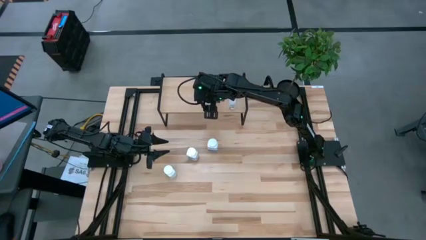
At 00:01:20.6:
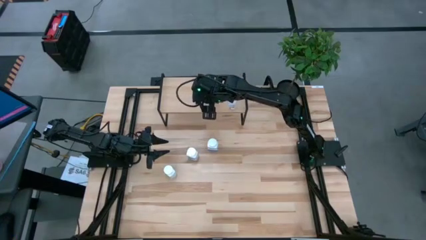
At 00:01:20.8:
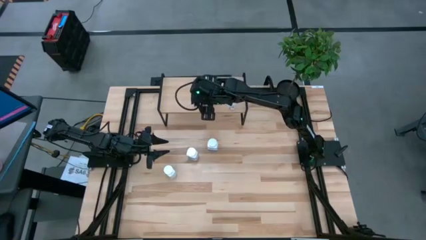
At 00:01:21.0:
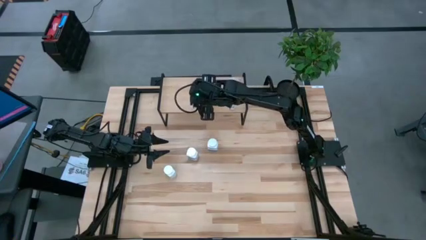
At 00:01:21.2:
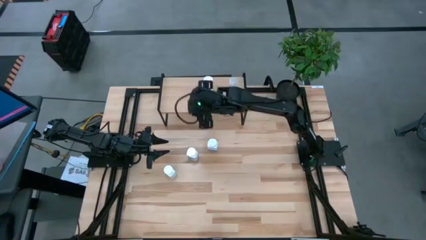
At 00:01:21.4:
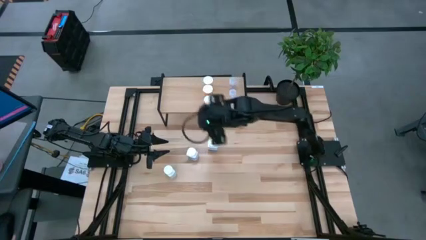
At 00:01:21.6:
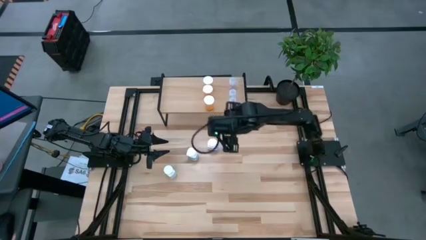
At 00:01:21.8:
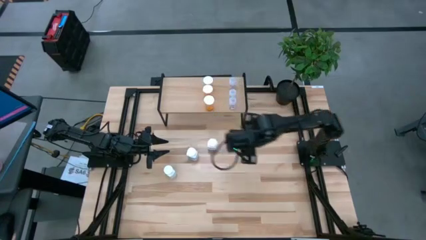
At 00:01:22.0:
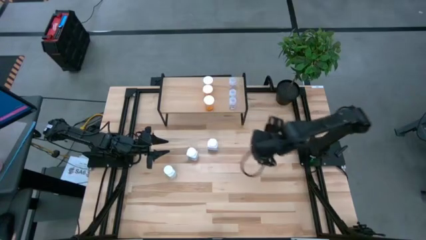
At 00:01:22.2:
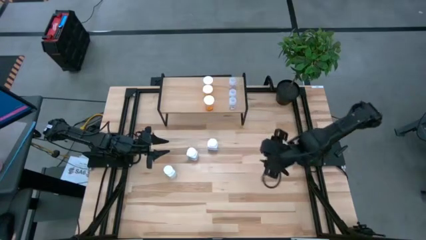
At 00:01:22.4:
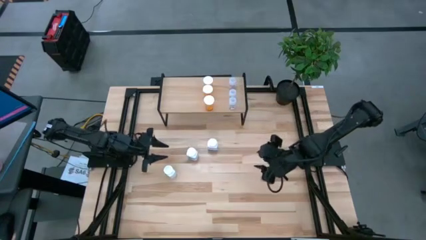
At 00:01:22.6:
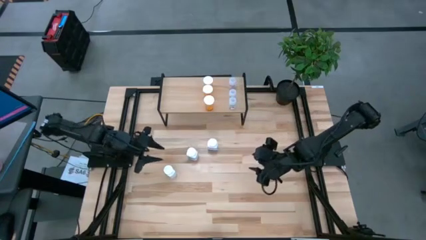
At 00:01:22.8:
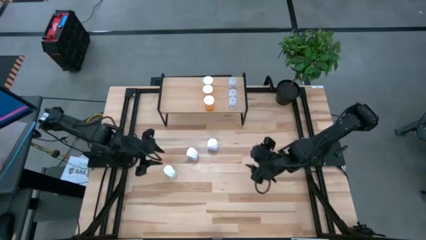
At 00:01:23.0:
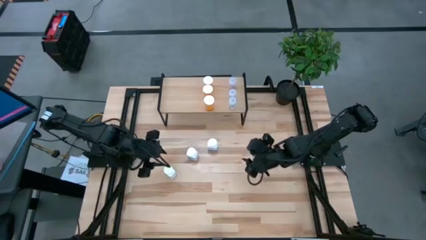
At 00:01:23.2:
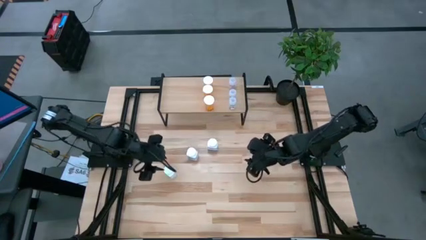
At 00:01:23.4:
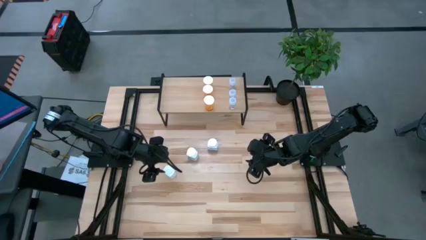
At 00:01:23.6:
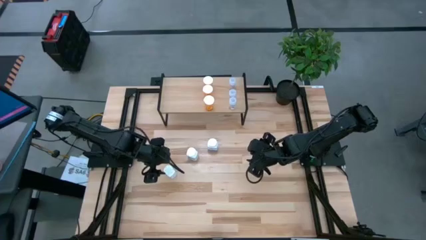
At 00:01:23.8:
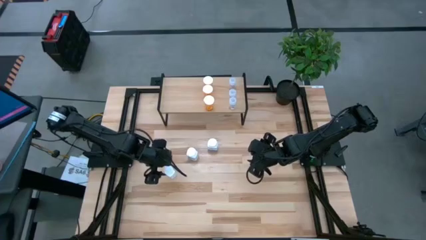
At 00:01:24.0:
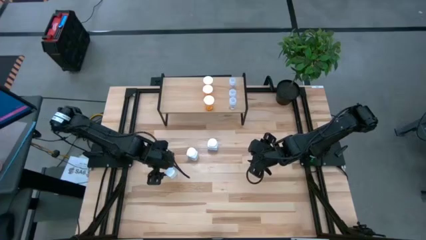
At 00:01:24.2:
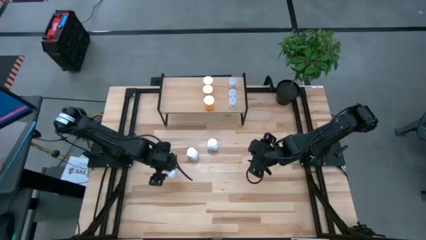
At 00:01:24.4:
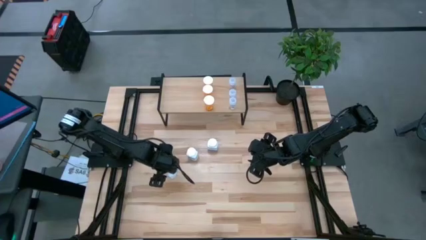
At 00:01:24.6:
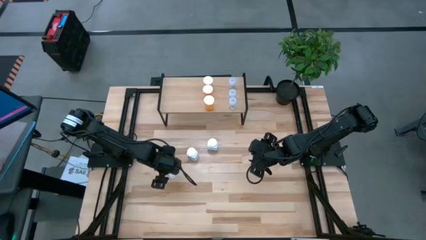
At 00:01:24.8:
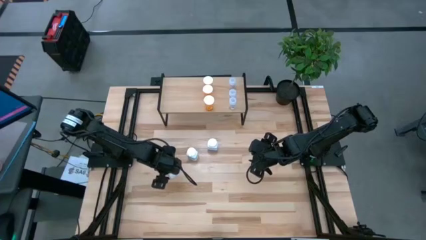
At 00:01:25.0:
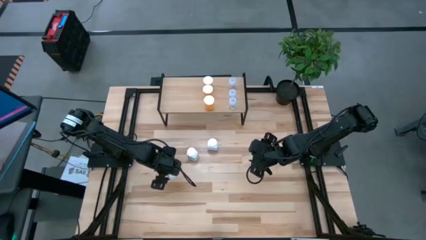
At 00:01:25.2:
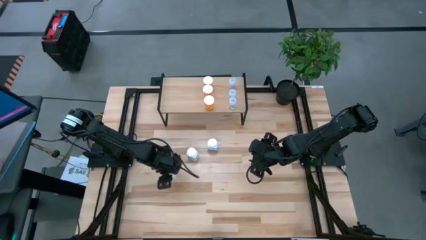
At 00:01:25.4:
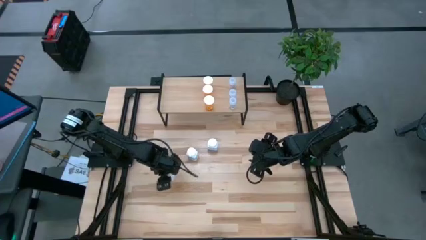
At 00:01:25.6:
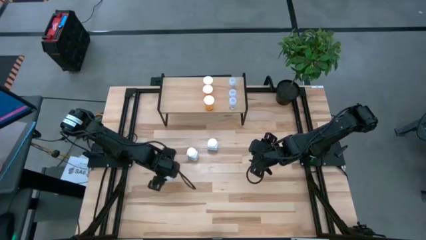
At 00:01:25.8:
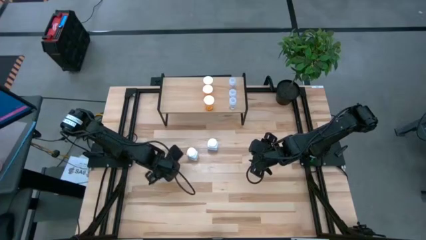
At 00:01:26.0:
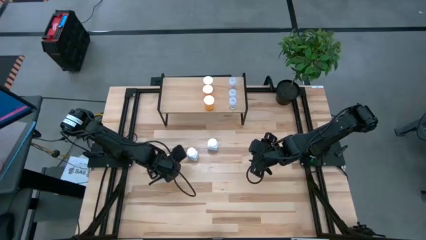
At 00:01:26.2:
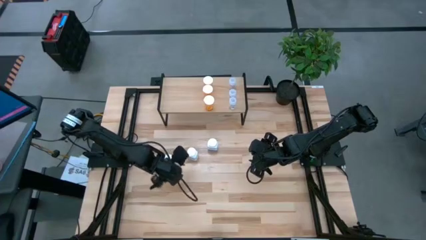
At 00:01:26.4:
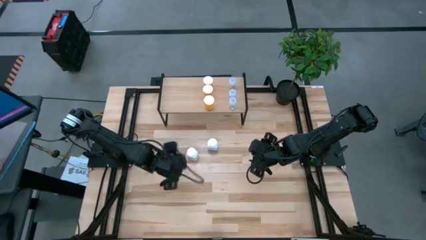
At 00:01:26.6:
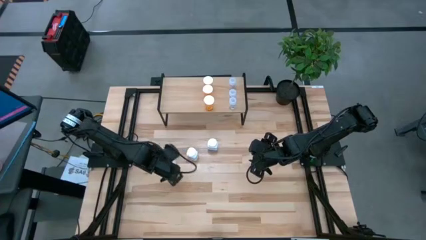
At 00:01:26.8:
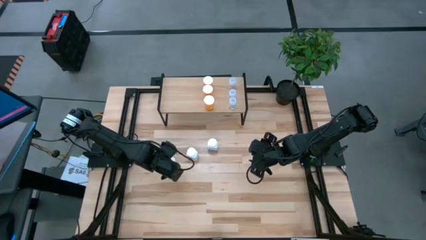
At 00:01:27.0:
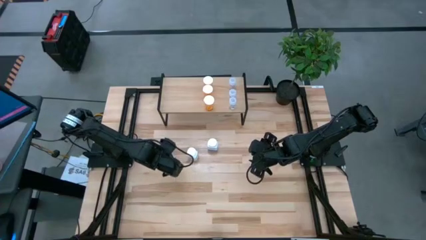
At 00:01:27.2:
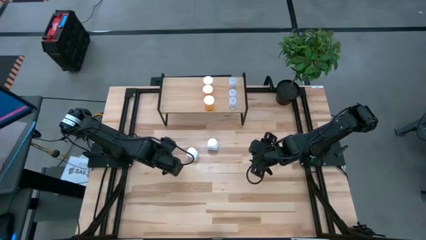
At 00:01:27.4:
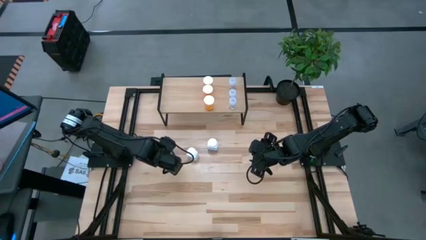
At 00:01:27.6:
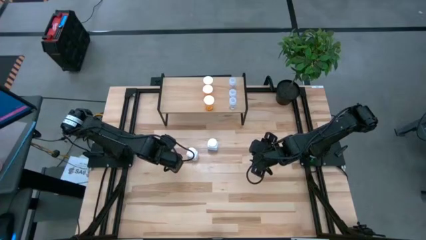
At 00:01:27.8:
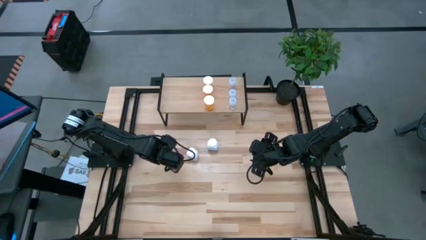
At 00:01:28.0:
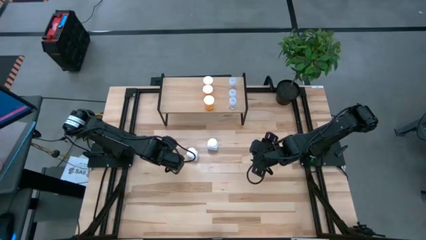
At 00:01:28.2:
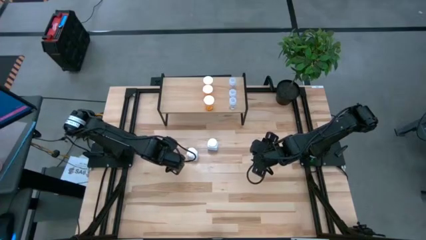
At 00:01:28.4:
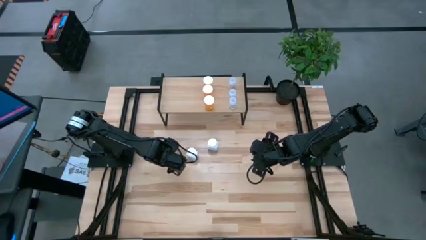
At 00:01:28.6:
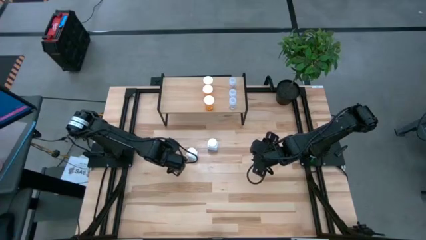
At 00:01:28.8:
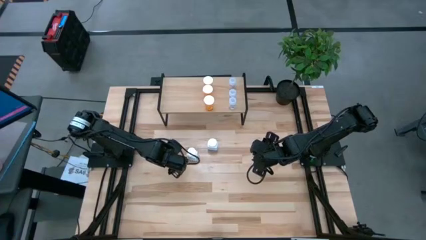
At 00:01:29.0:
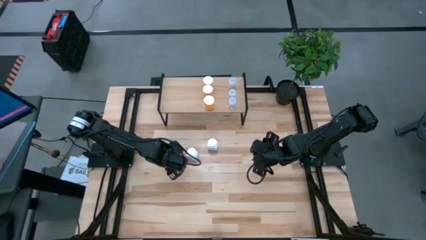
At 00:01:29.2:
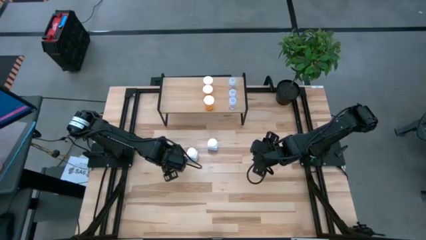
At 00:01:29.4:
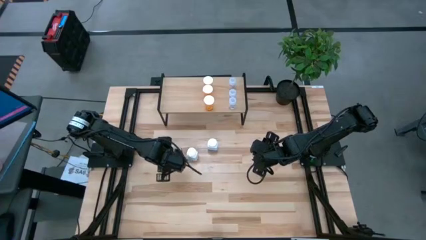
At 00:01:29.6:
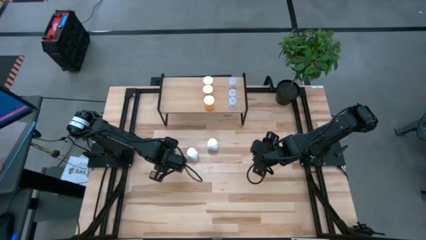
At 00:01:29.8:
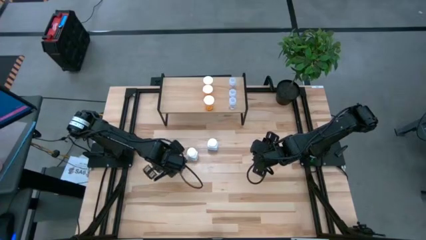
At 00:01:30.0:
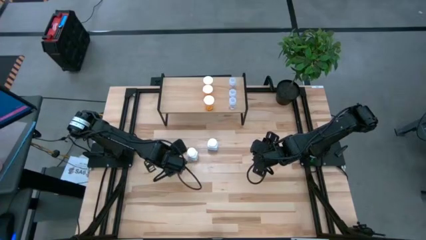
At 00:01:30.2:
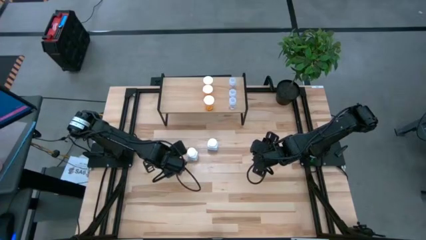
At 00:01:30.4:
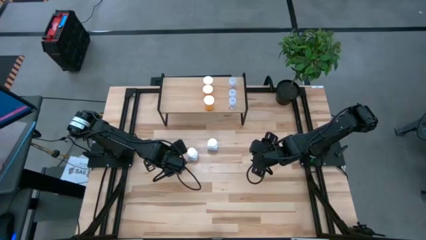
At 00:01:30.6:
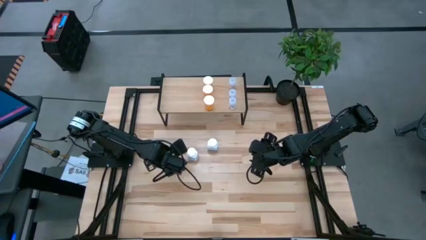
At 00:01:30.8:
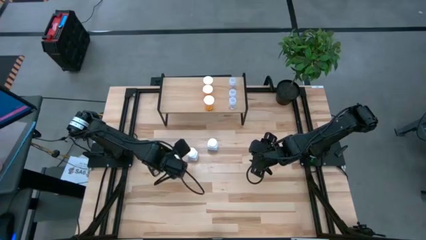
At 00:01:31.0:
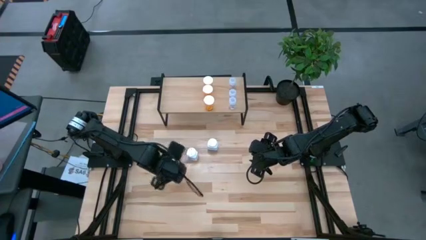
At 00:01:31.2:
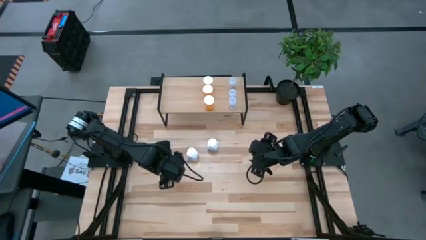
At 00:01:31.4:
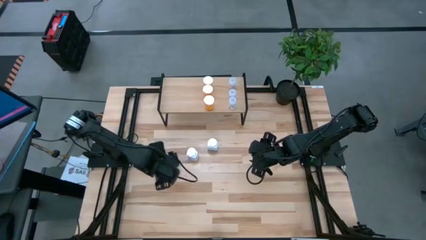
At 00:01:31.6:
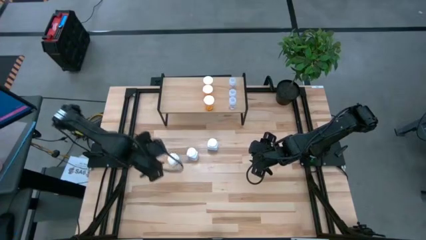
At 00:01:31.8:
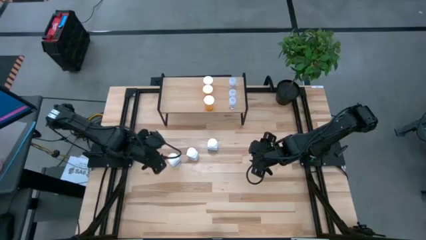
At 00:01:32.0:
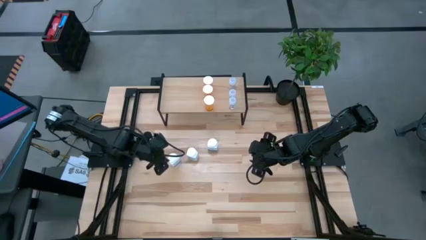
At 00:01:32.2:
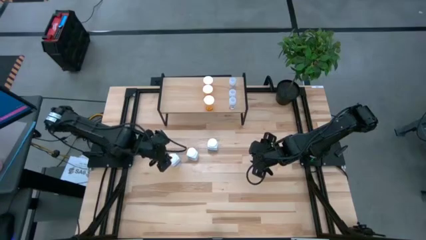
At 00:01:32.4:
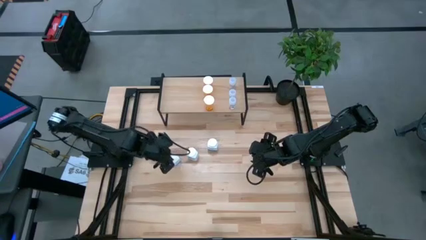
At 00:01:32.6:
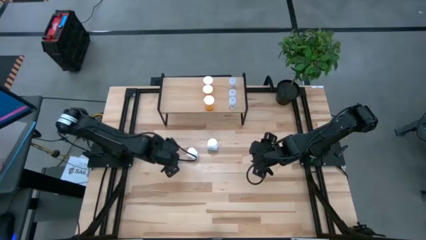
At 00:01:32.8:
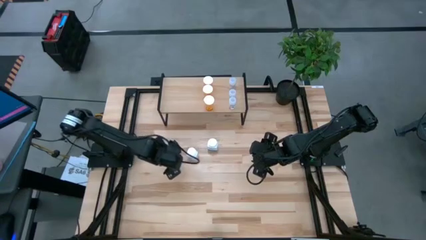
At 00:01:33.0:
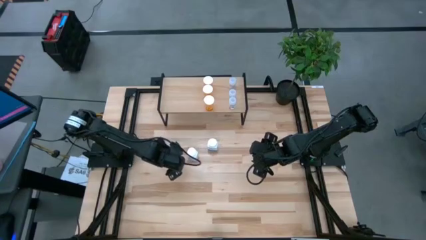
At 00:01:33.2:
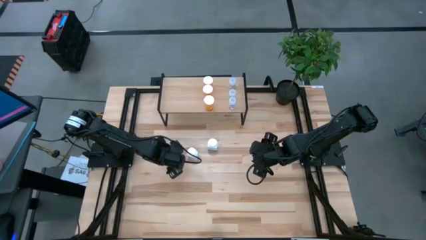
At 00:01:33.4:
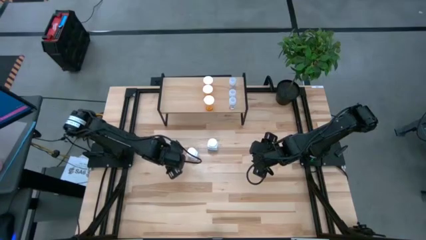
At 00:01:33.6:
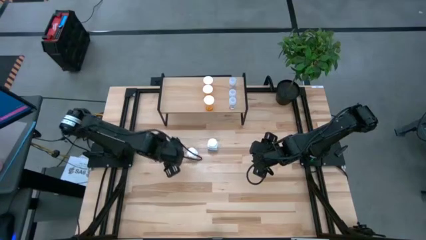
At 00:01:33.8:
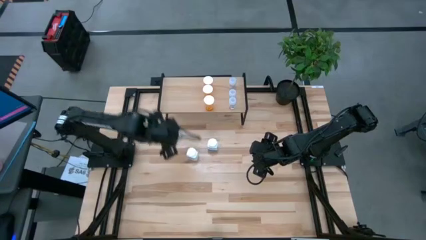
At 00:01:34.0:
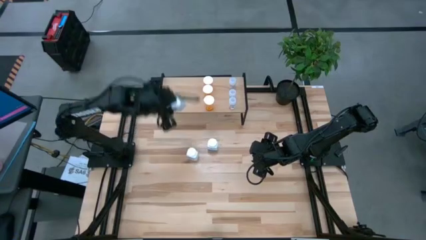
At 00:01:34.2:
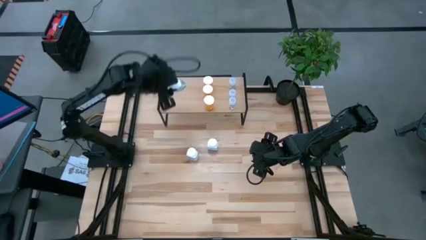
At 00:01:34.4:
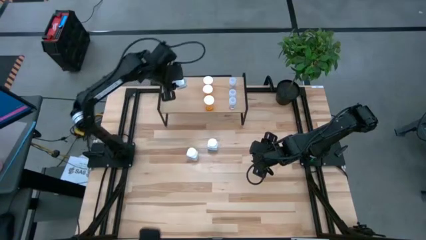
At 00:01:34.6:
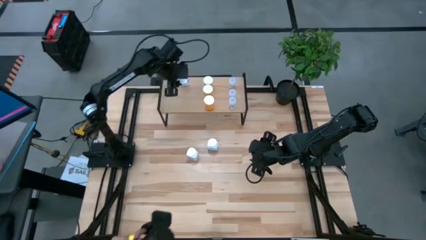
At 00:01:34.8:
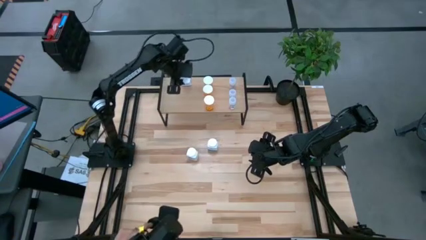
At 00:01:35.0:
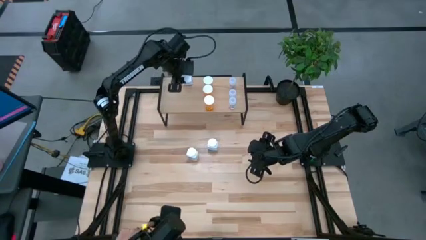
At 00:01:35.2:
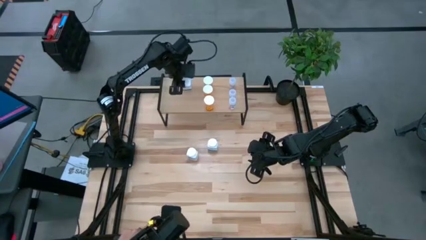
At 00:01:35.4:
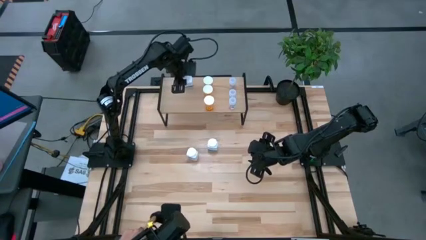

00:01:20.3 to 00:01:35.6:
Task: Pick and place medicine bottles onto shelf by color
Put the bottom white pill bottle on the shelf
